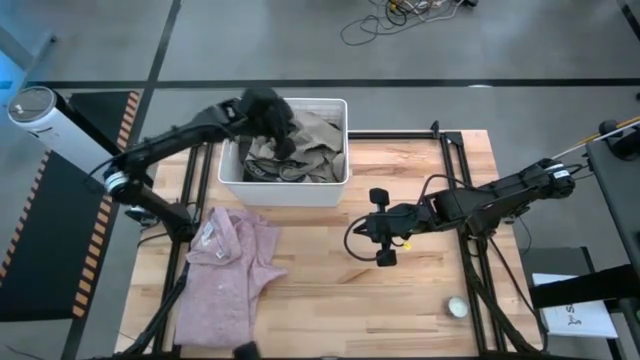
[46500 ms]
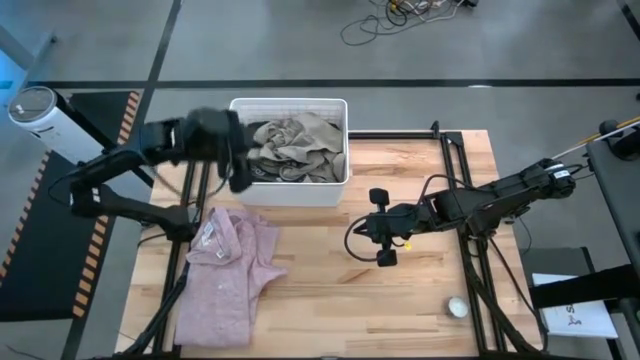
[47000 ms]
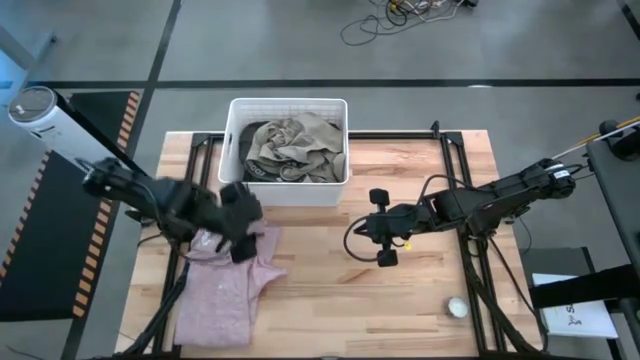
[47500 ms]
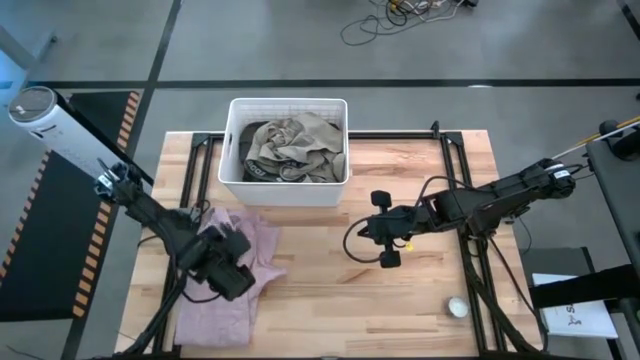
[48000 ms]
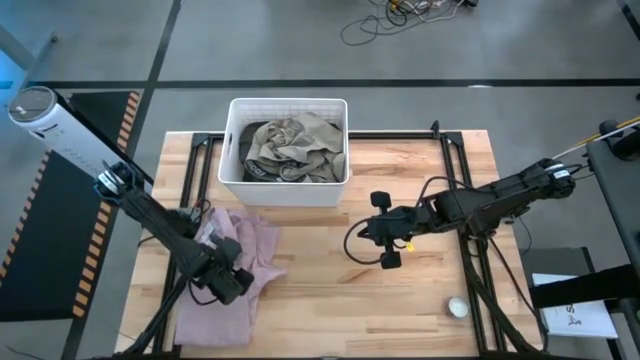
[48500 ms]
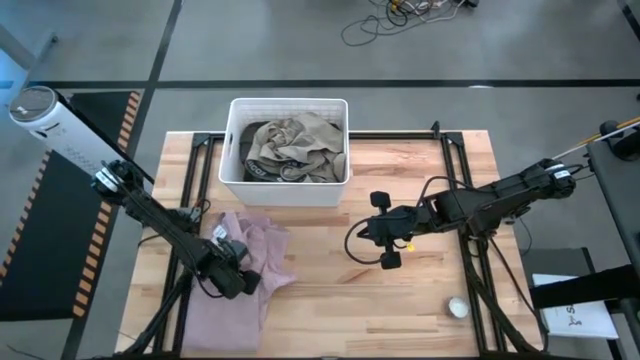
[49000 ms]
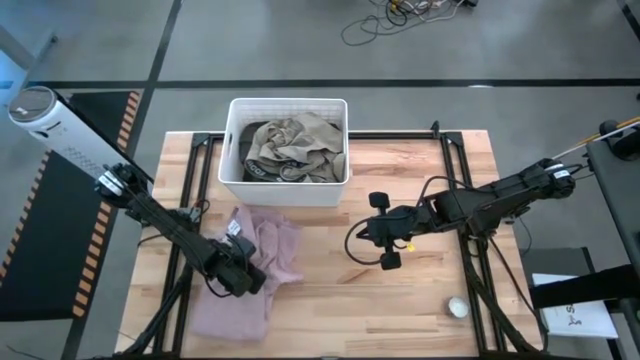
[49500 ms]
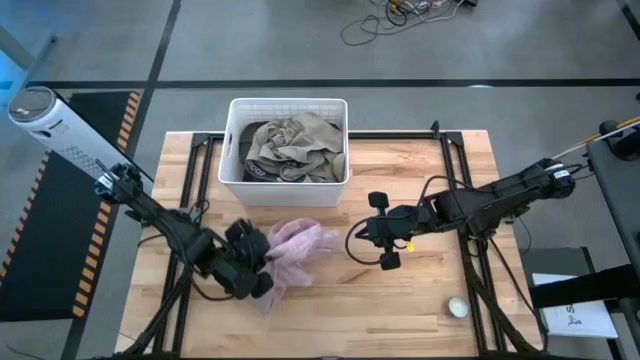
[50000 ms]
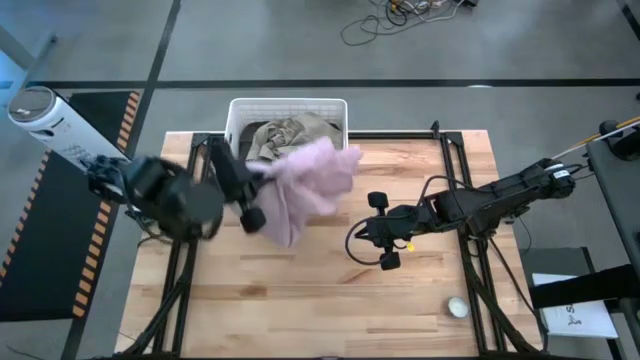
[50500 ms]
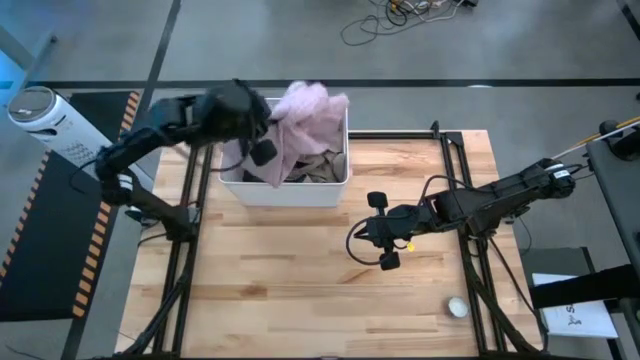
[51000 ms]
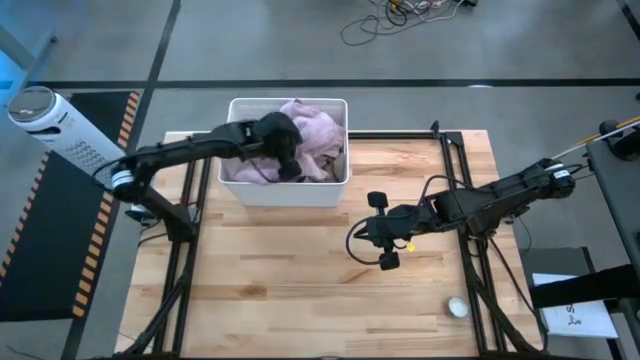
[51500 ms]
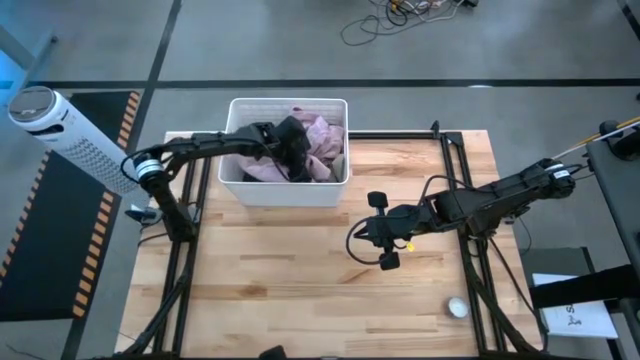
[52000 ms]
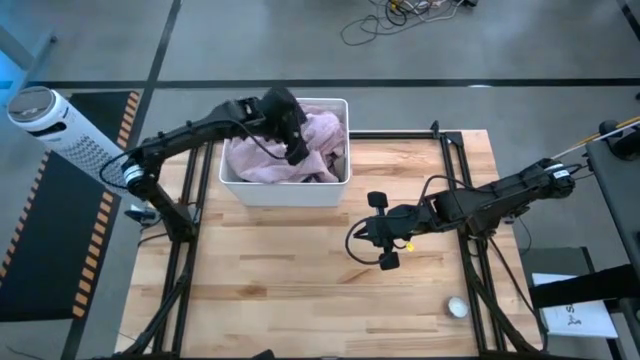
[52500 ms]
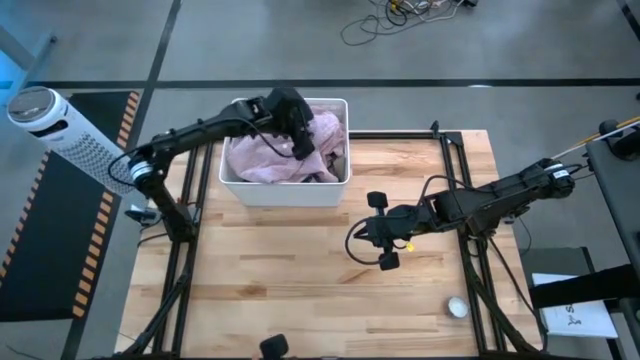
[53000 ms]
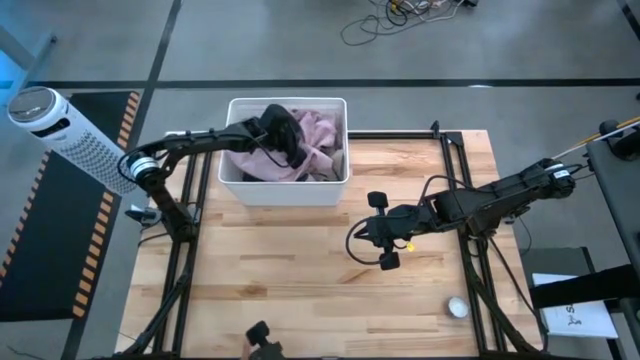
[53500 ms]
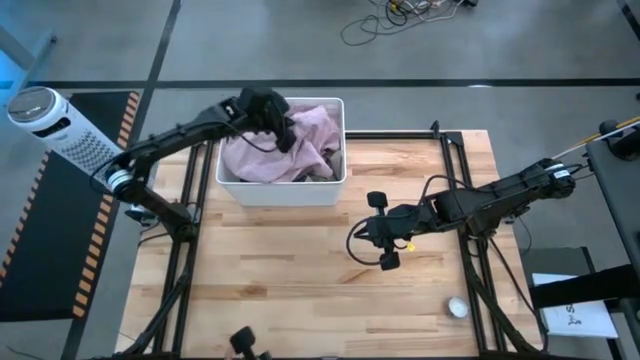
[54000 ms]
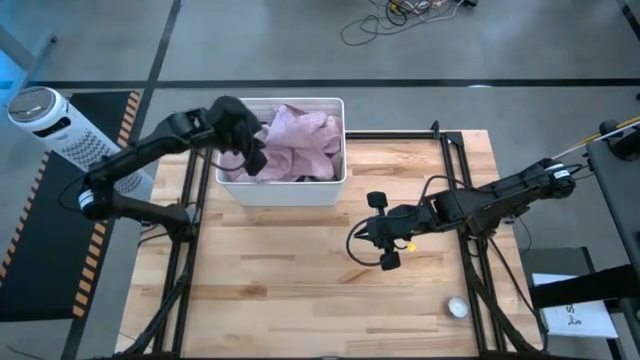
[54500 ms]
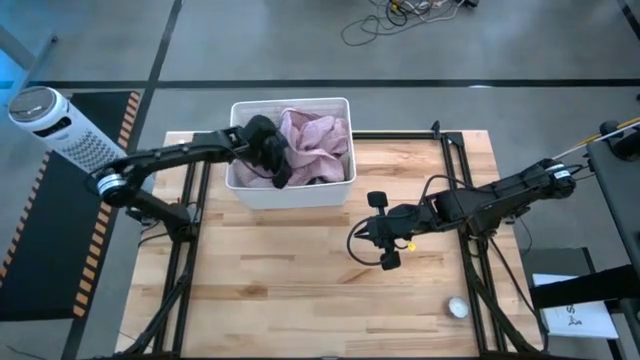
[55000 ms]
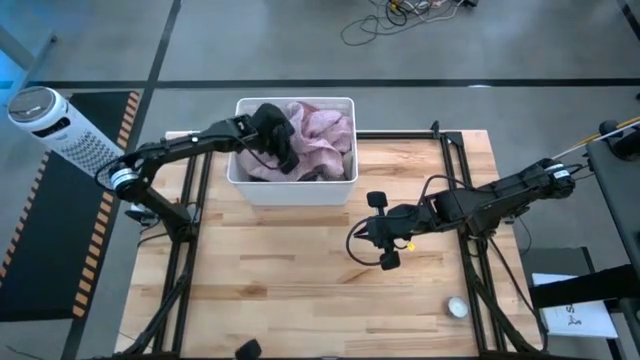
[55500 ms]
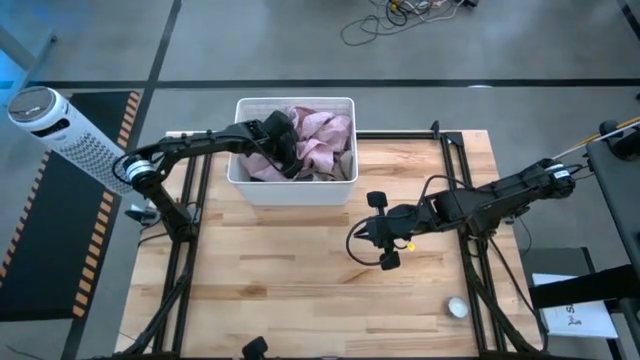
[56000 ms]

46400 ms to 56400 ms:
Task: Sort clothes
Put the pink polo shirt into the bin

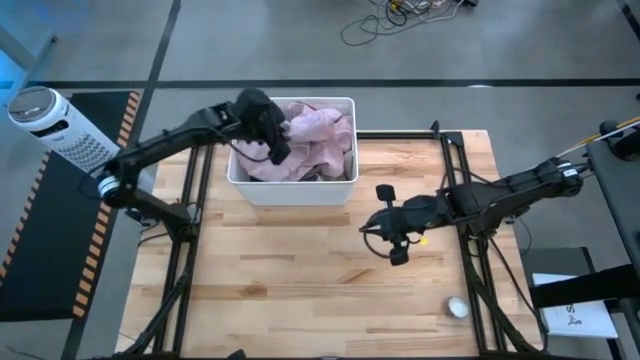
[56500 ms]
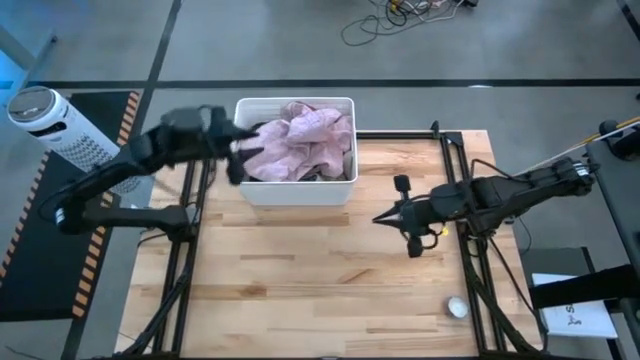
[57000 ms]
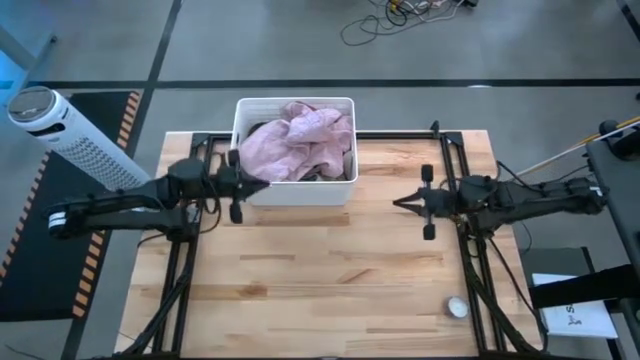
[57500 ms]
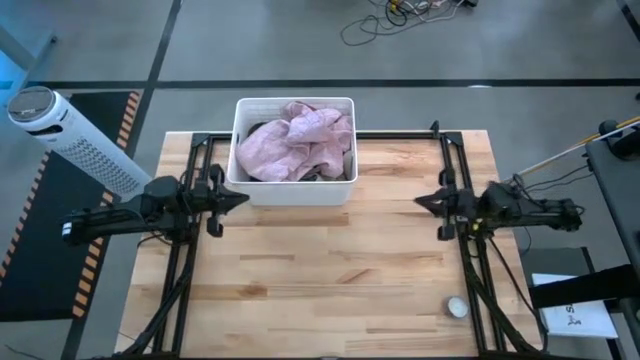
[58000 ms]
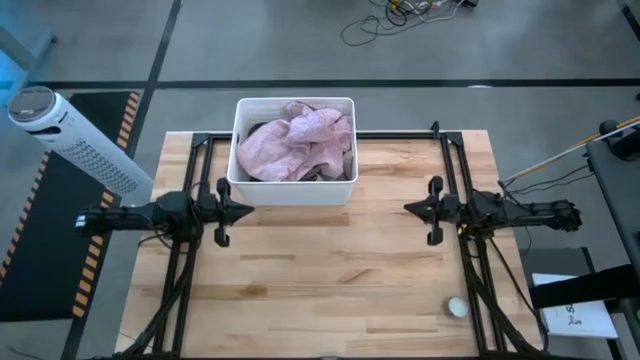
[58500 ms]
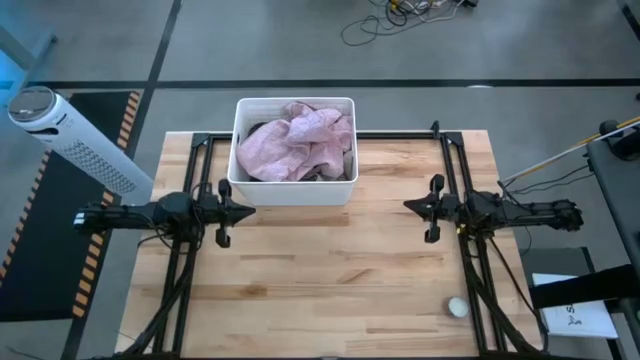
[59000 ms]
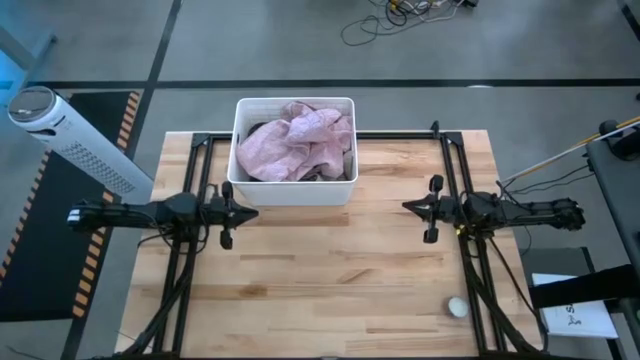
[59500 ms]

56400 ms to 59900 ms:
Return to Home Position

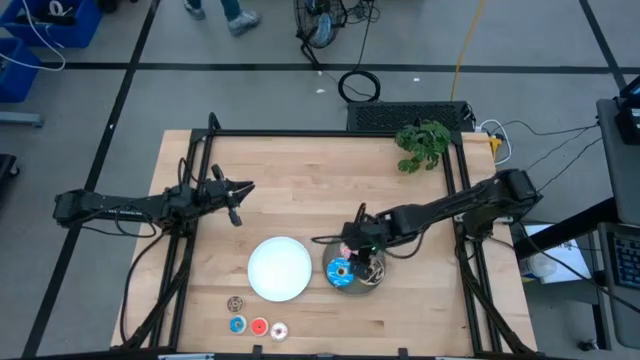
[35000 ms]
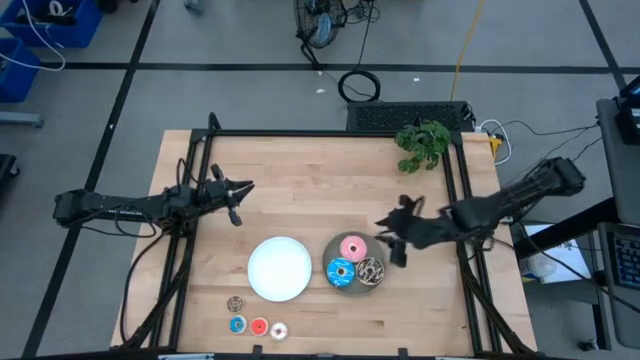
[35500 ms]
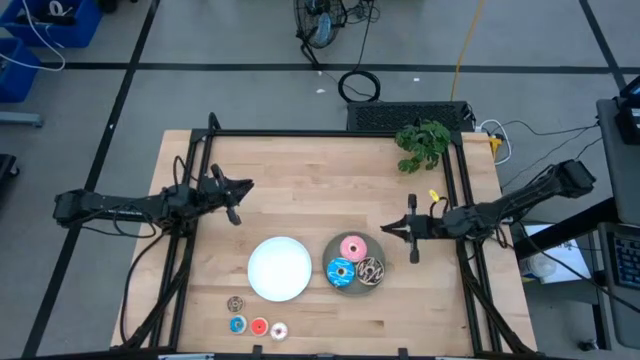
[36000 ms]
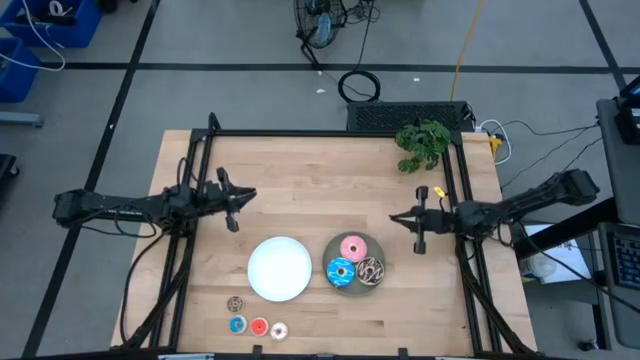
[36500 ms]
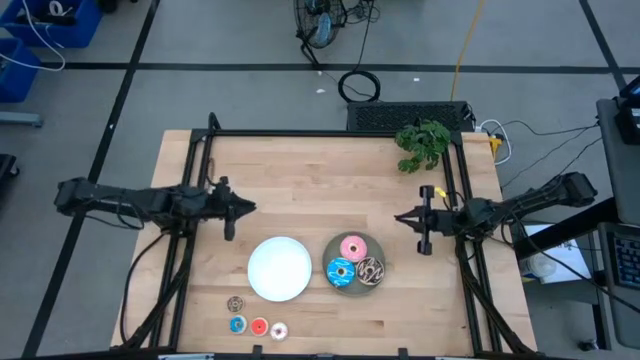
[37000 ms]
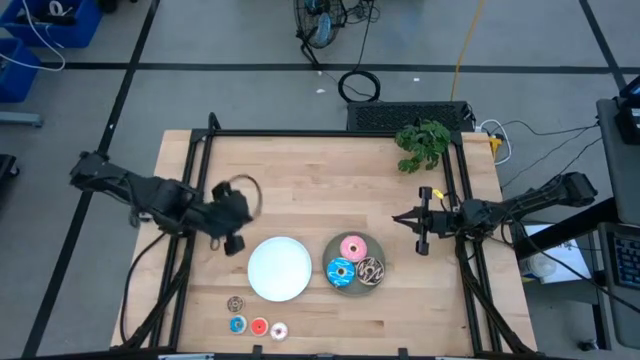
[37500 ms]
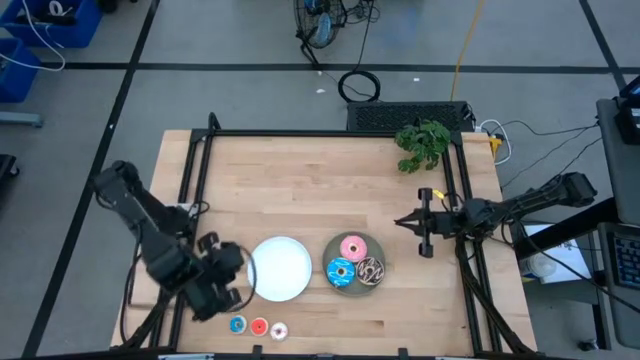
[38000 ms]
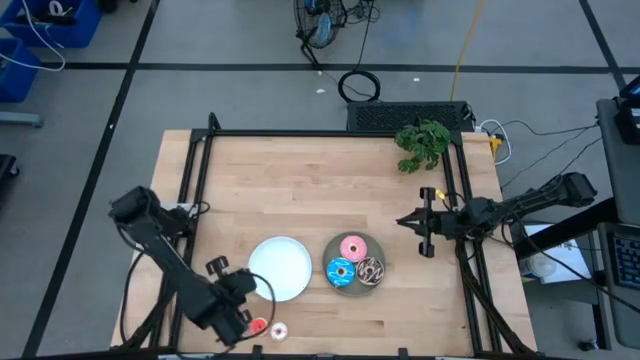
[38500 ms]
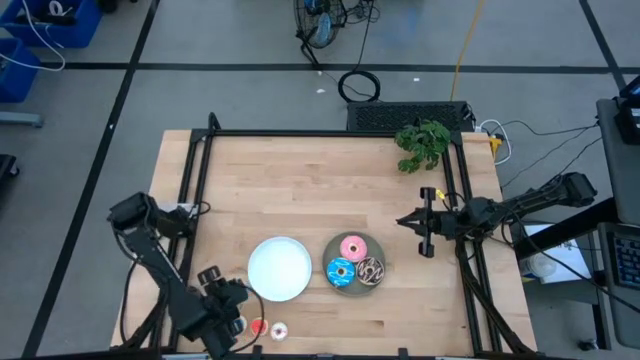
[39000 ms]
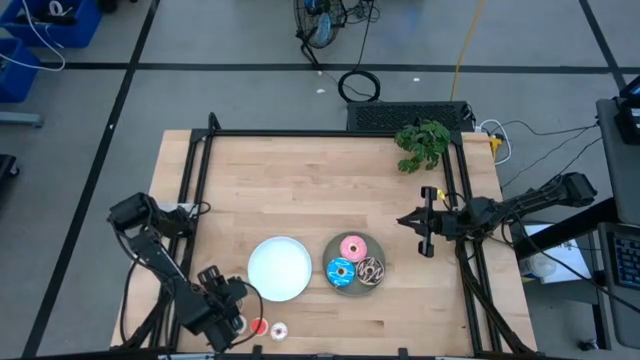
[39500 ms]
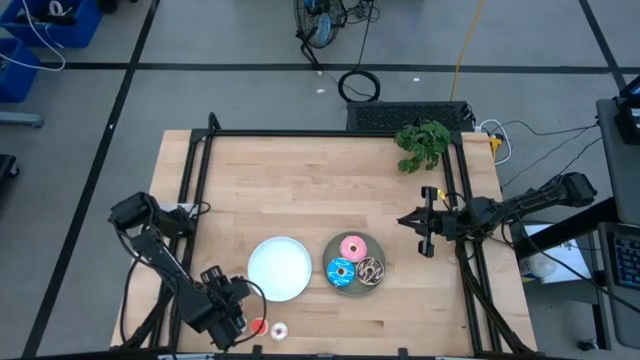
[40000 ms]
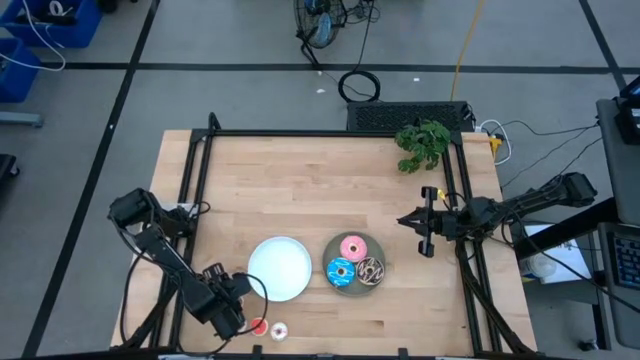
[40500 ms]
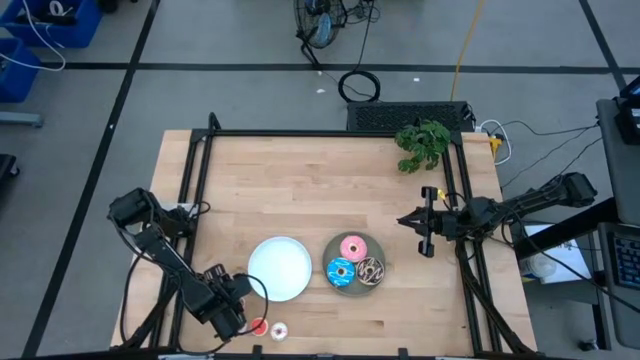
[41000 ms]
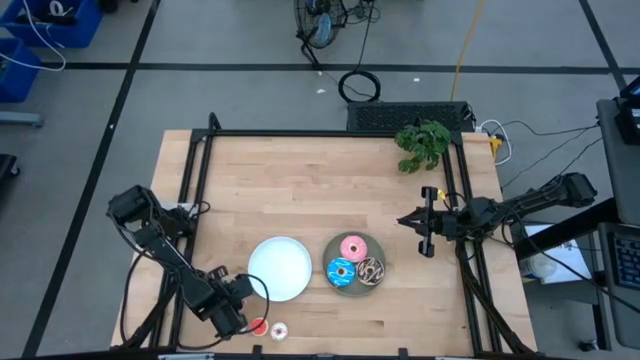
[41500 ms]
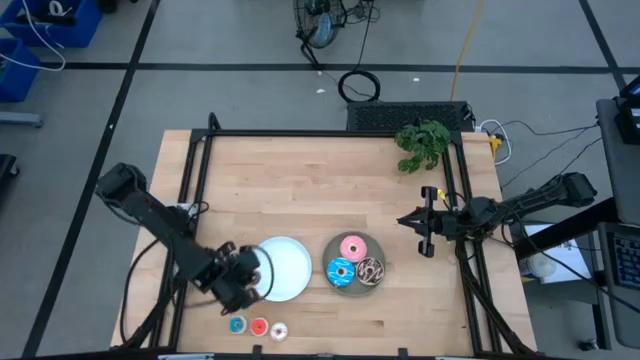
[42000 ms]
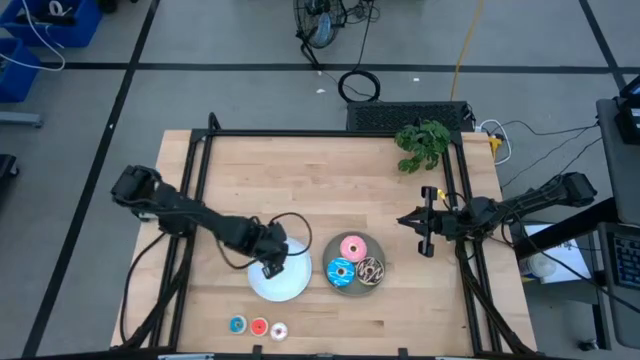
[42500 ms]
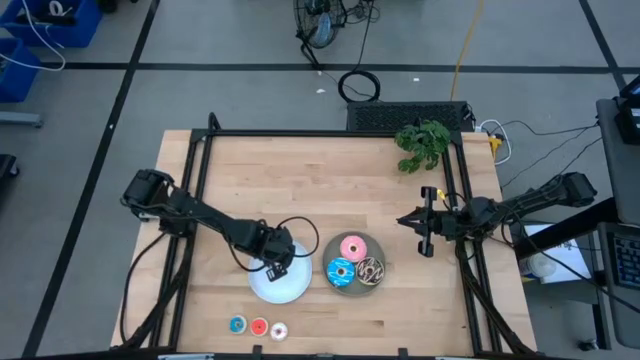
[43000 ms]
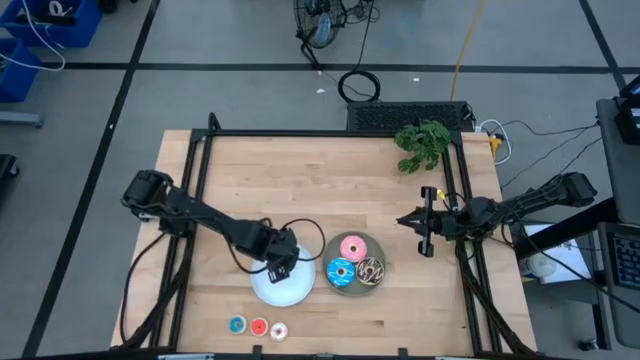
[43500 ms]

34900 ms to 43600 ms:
Task: Pick & Place donuts
Put the small brown donut on the white plate
